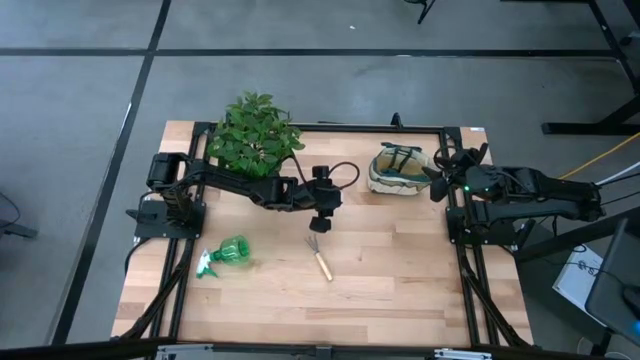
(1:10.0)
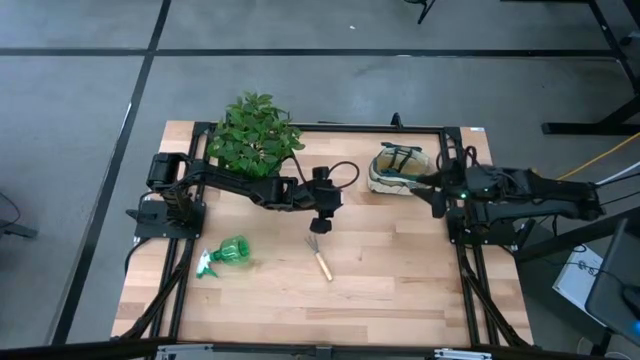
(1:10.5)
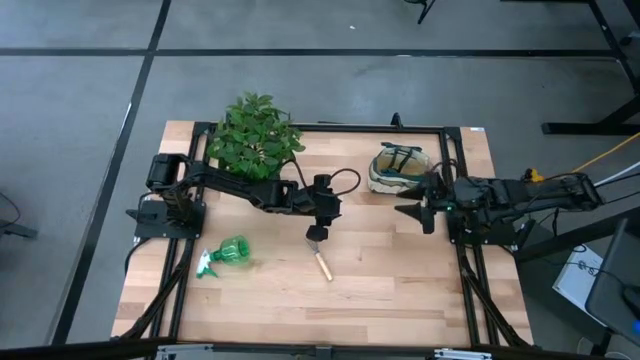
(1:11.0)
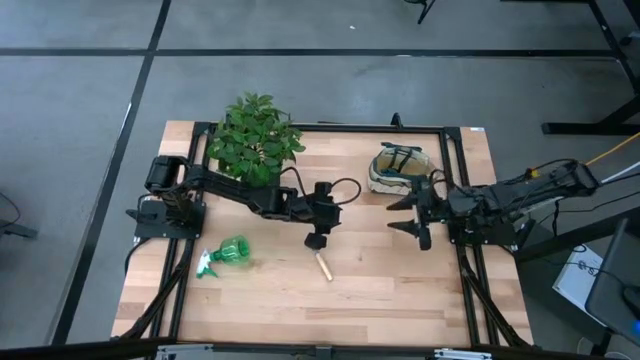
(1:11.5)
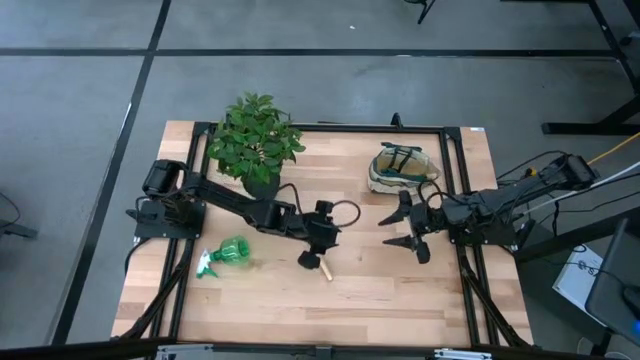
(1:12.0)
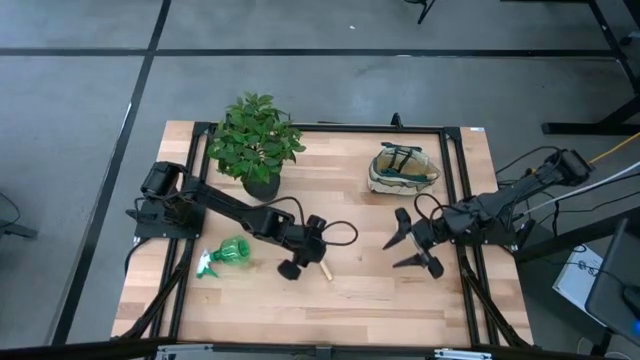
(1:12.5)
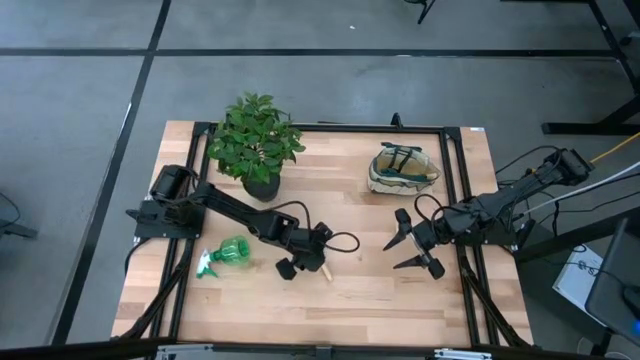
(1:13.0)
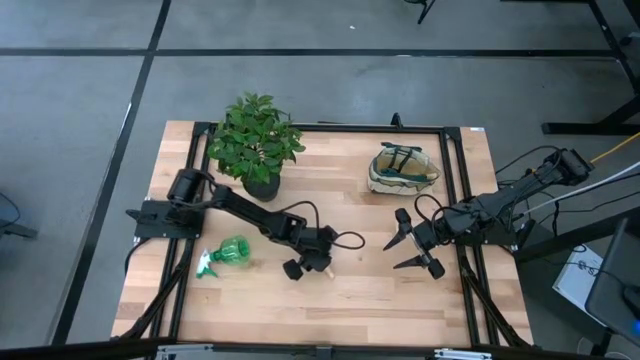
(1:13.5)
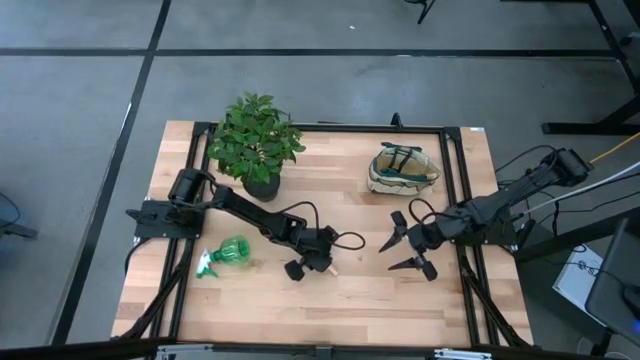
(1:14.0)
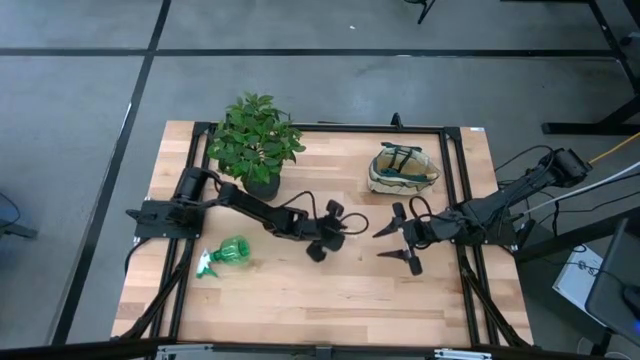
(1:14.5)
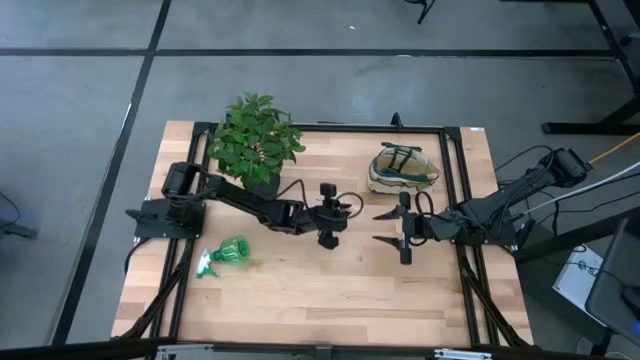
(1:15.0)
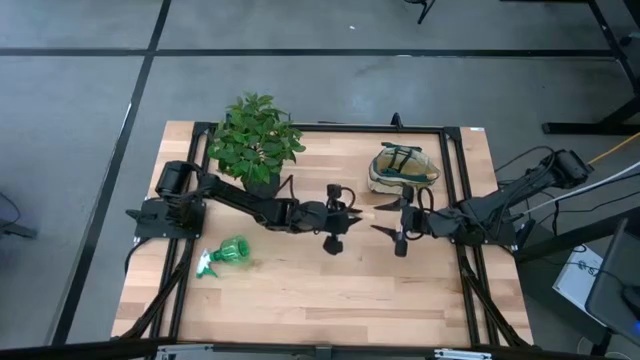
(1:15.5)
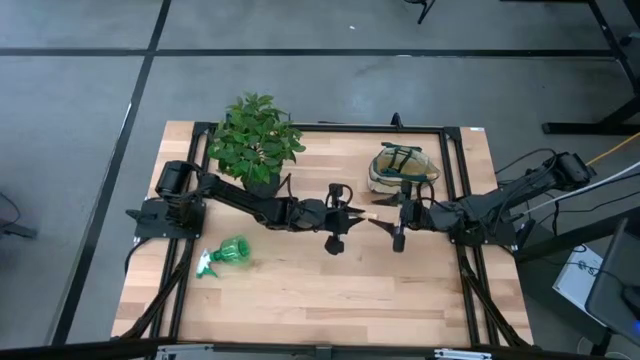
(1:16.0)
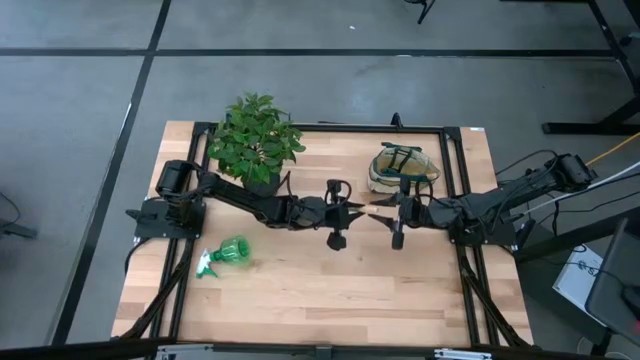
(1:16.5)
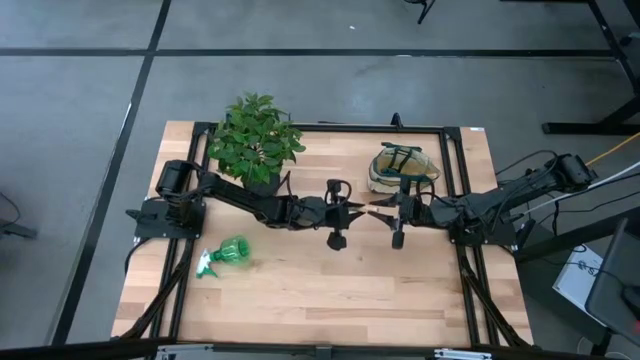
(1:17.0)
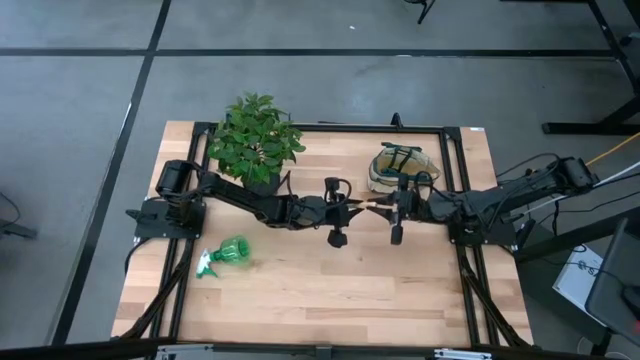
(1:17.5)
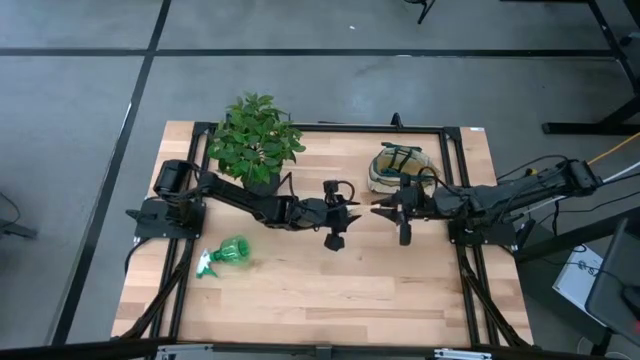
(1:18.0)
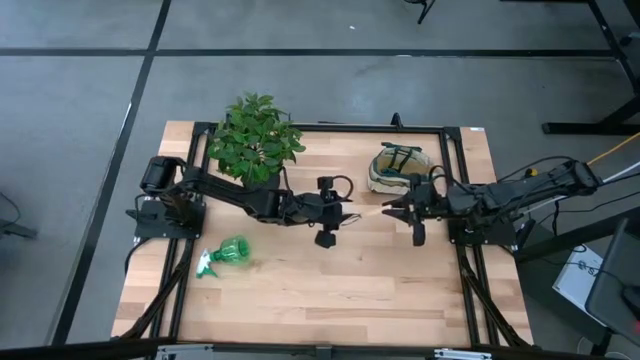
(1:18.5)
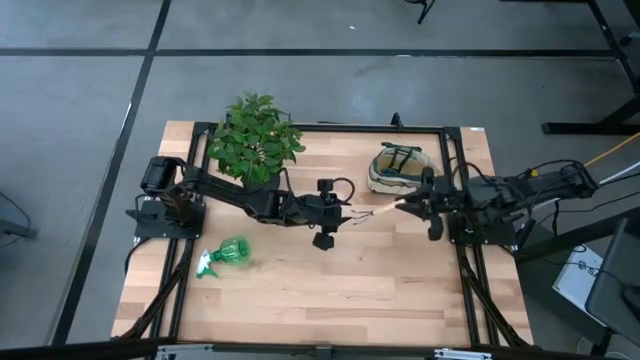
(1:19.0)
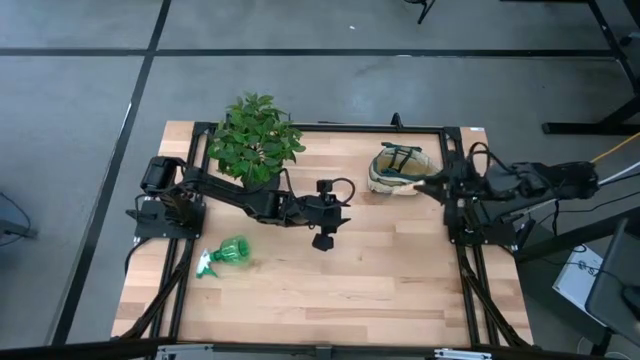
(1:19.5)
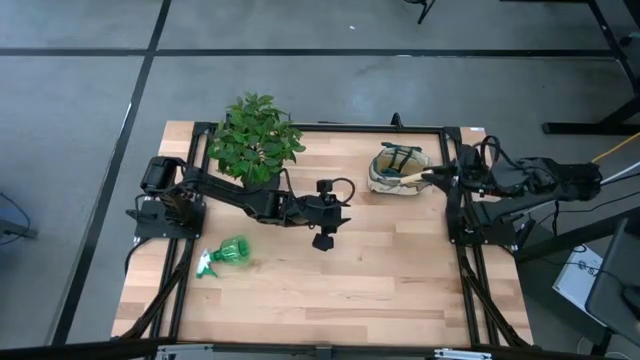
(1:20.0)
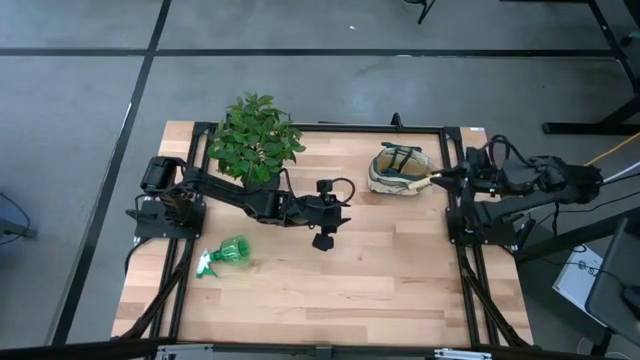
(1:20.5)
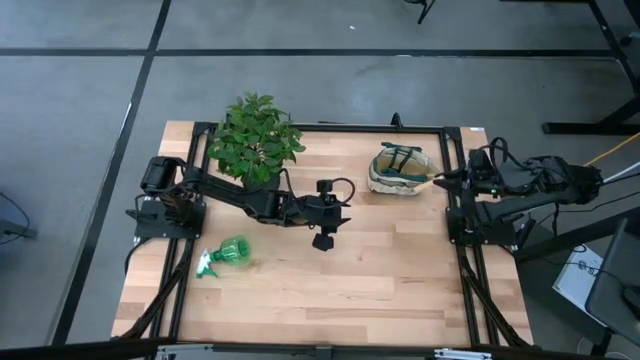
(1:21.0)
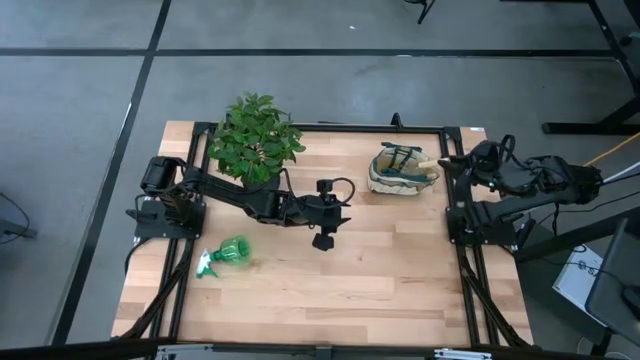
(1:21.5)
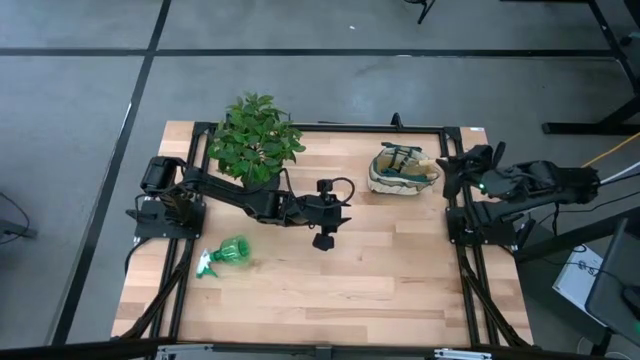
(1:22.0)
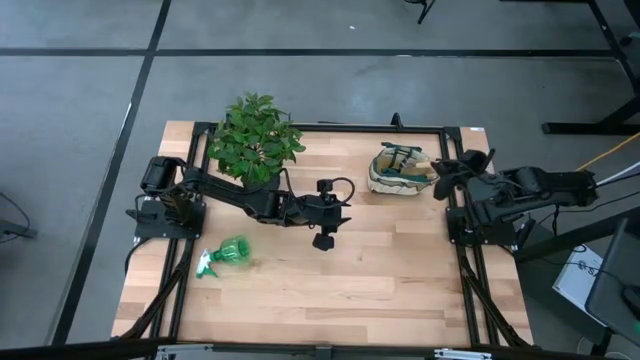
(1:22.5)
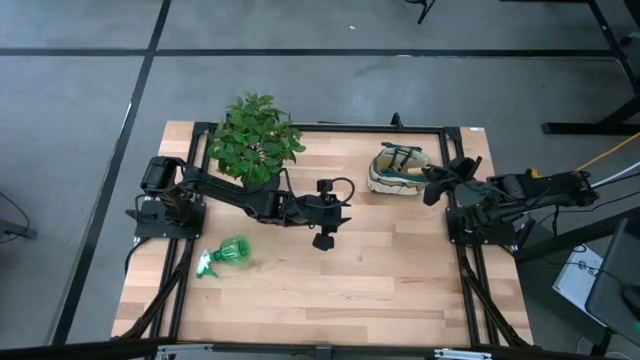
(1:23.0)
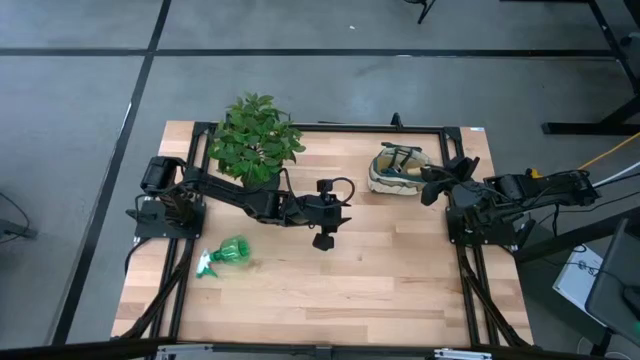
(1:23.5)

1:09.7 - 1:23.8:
Task: Pick & Place Garden tools in Gardening bag
Put the brown hand rake into the white gardening bag

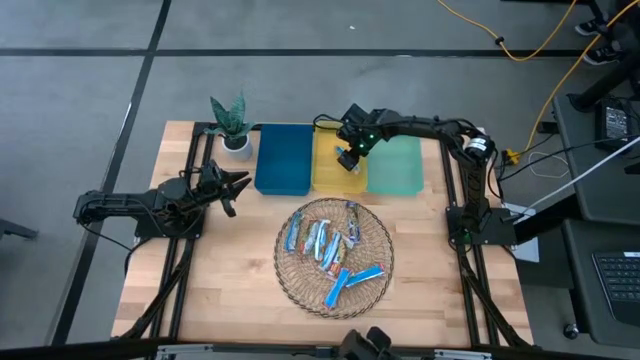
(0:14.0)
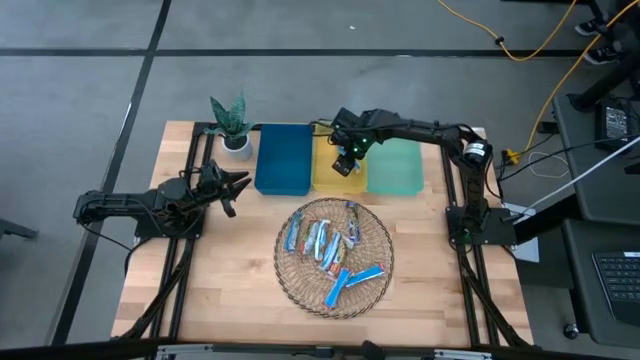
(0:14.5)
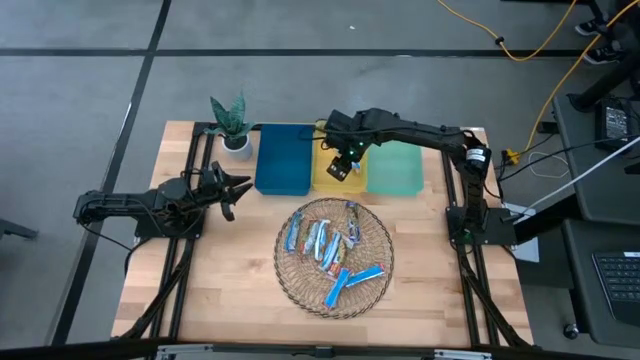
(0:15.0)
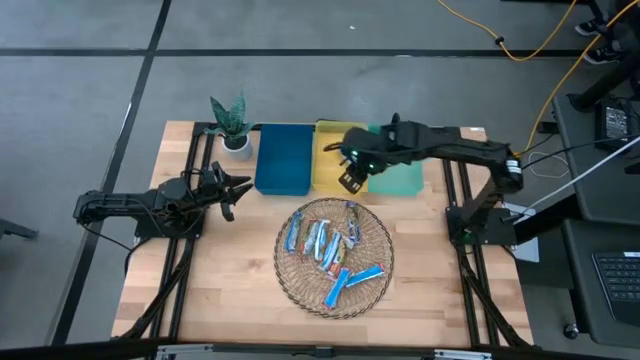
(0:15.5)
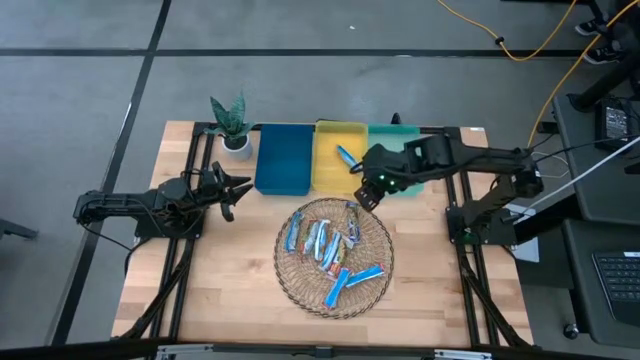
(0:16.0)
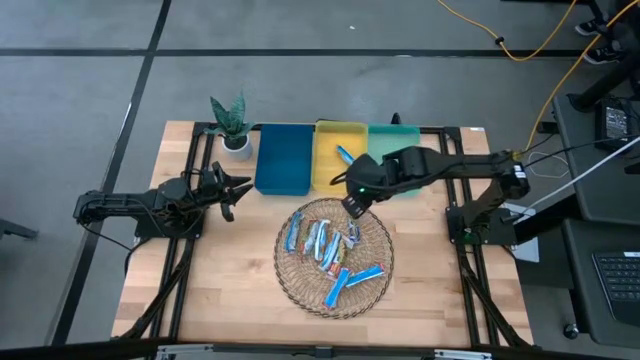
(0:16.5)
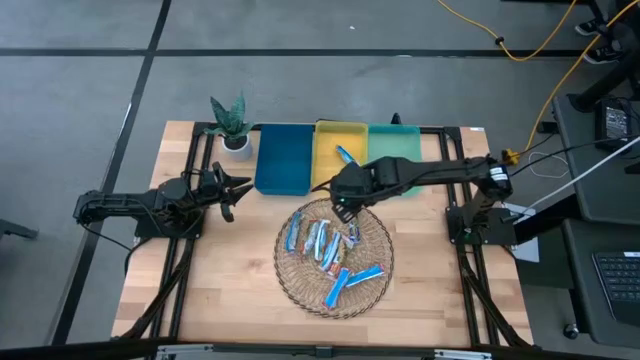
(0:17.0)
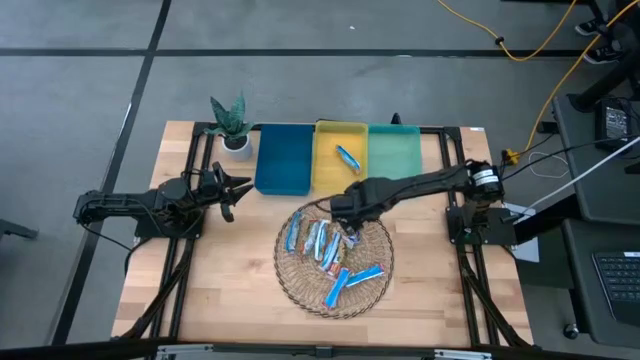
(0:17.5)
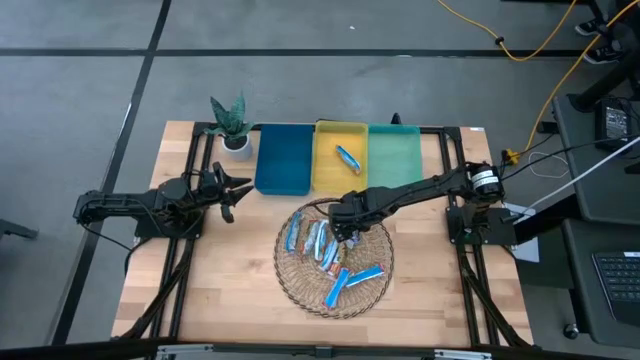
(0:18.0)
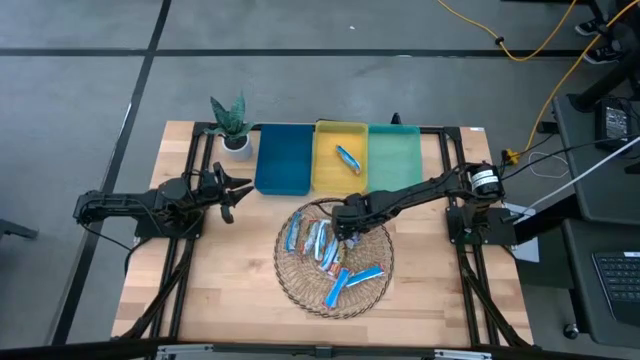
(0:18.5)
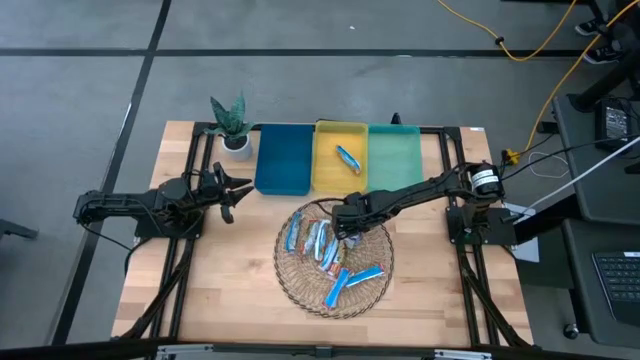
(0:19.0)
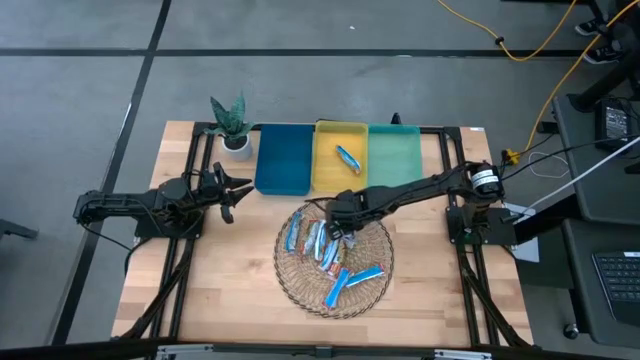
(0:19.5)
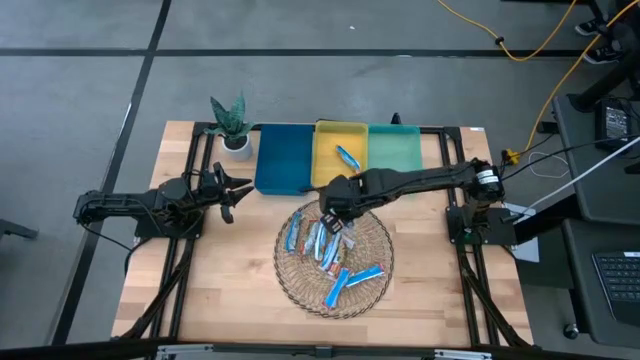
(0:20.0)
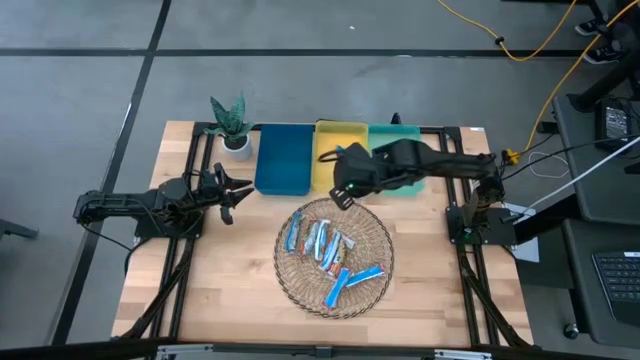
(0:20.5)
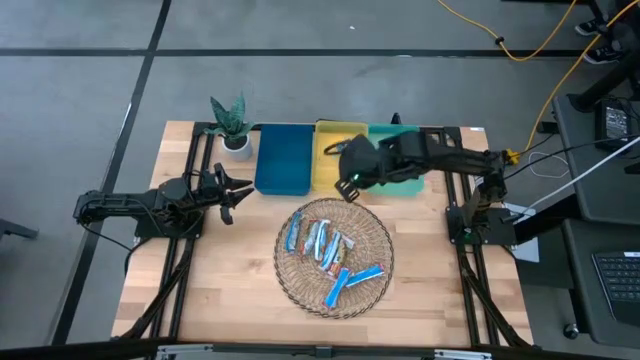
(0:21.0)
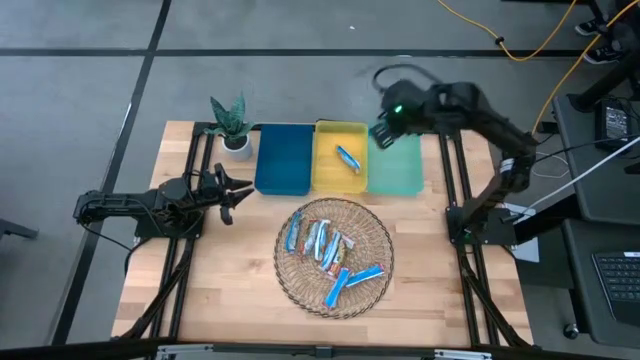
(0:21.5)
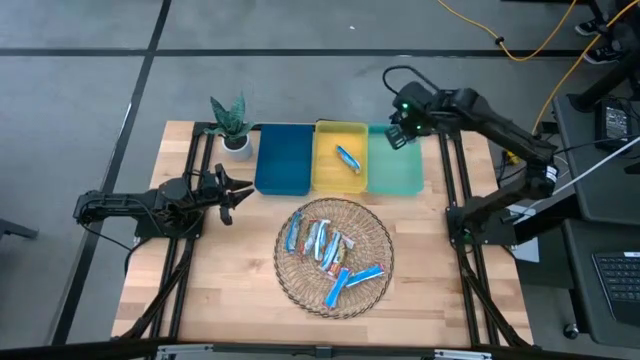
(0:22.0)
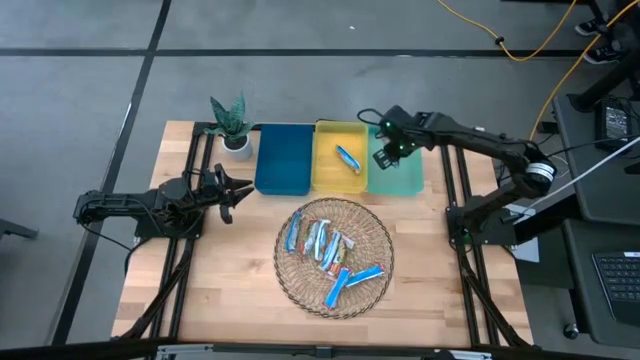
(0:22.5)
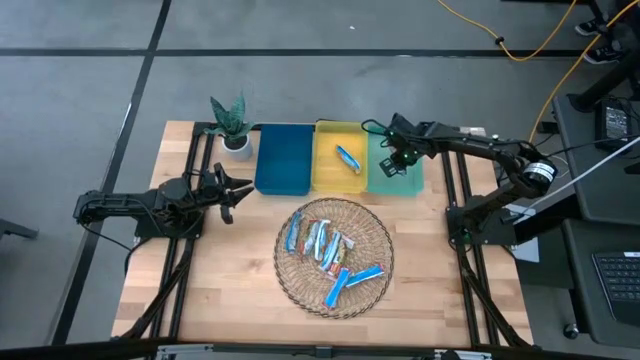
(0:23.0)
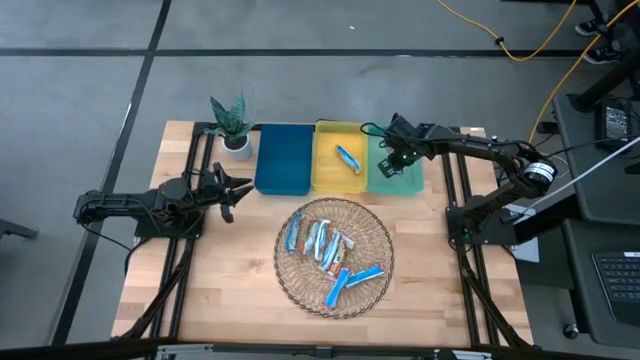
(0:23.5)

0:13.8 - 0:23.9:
Task: Pick and place Granola Bars by type
Put the blue granola bar into the light blue bin
